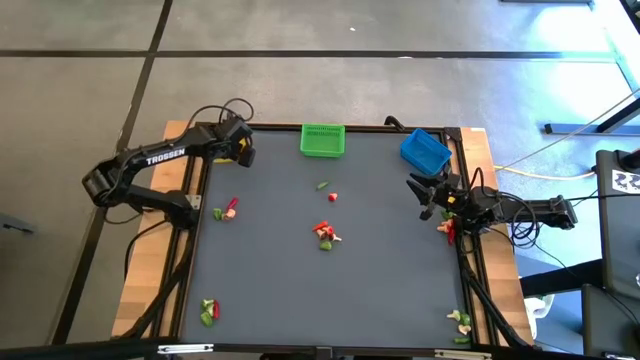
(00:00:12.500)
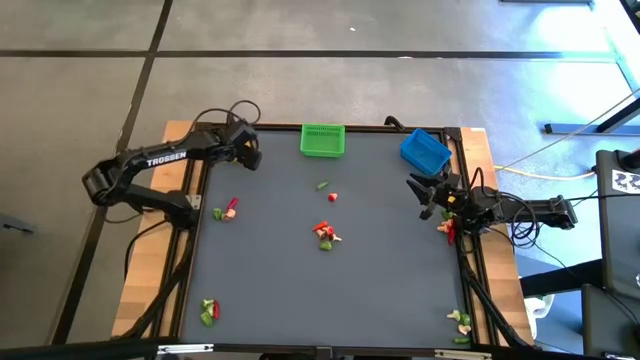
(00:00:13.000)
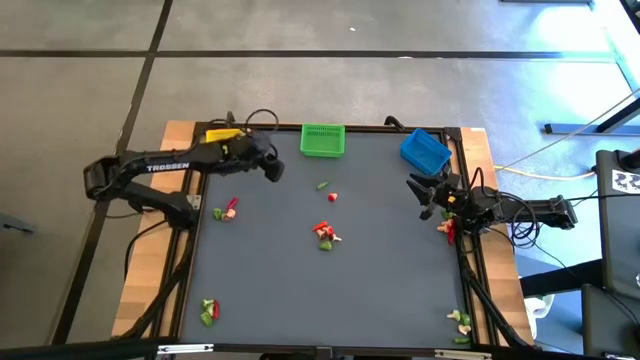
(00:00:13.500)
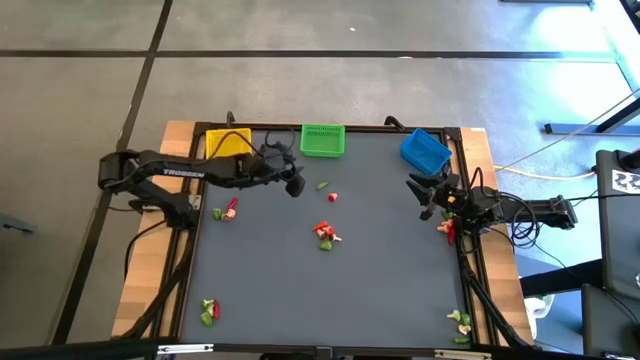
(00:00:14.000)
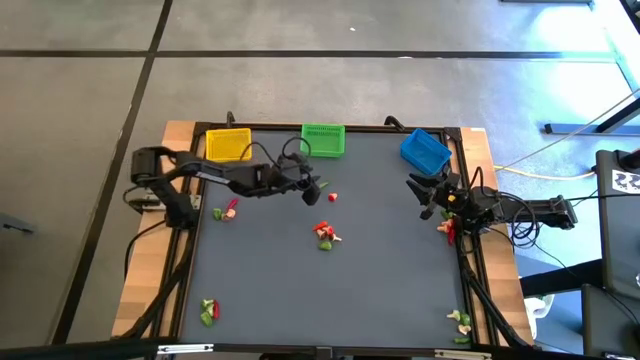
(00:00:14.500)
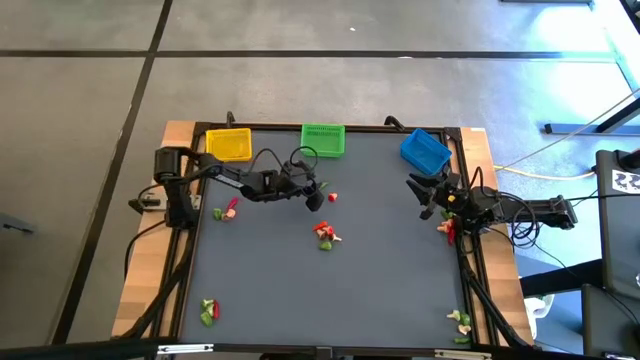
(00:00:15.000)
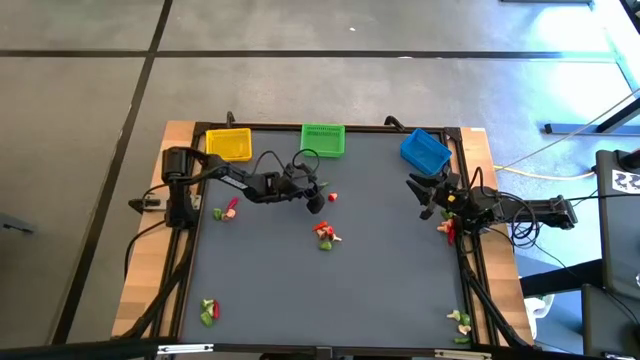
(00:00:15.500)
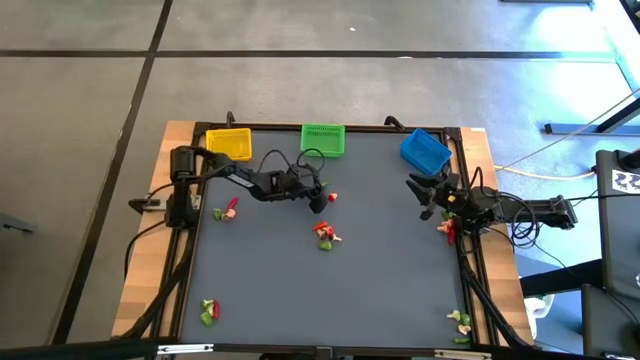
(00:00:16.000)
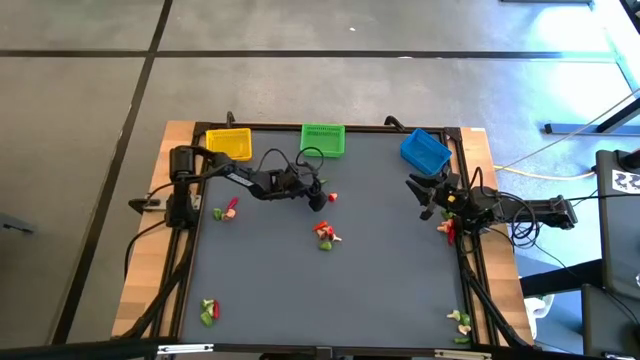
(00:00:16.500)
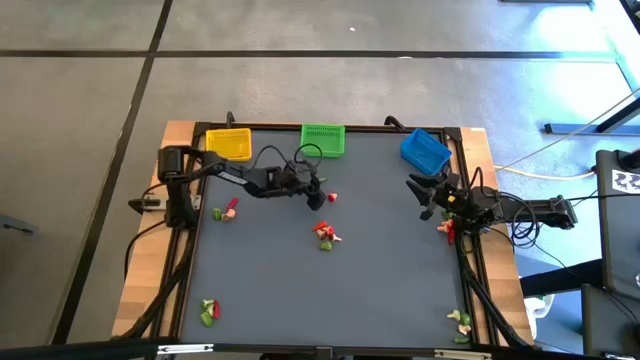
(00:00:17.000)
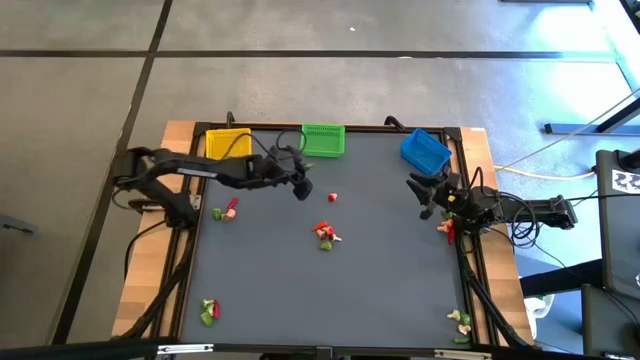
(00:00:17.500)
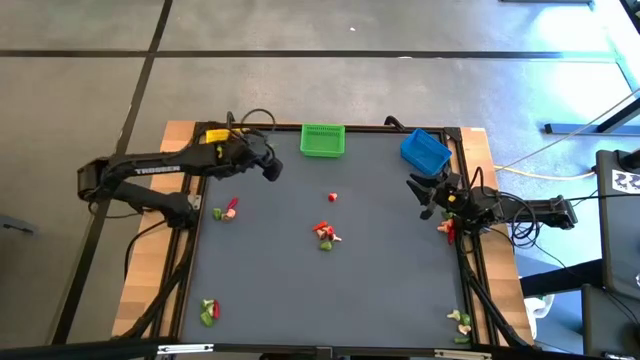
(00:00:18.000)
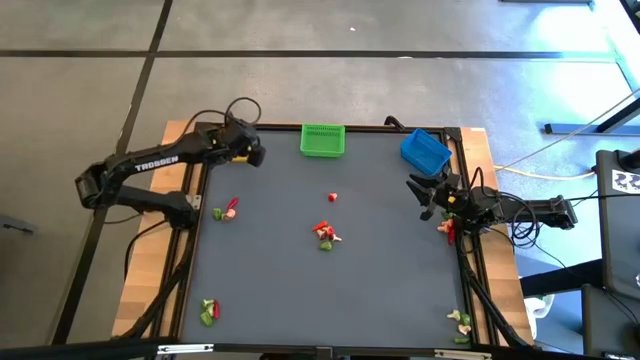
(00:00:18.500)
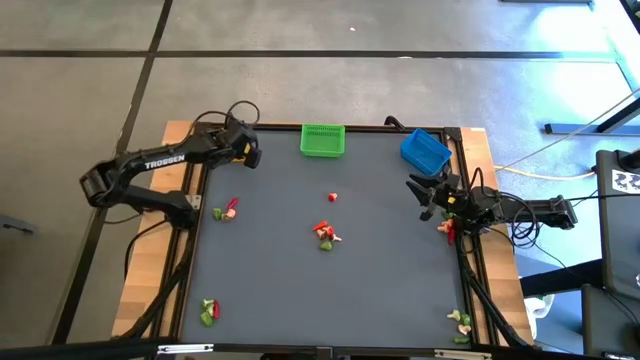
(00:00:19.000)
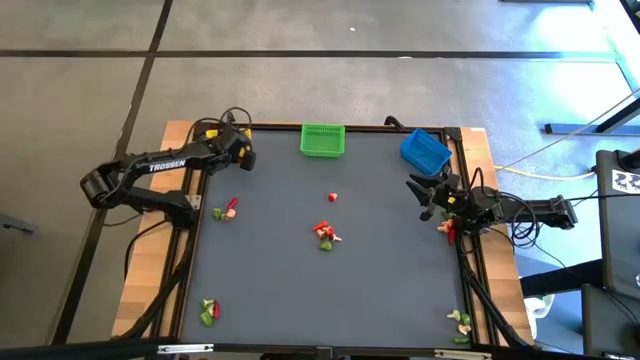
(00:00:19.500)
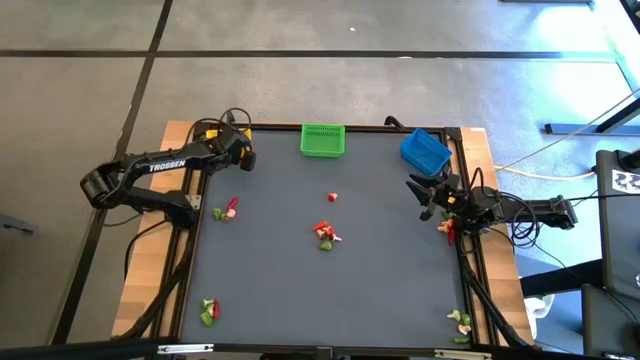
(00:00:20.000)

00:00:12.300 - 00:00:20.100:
Task: Sort produce into baskets
Put the green chili pepper into the yellow basket

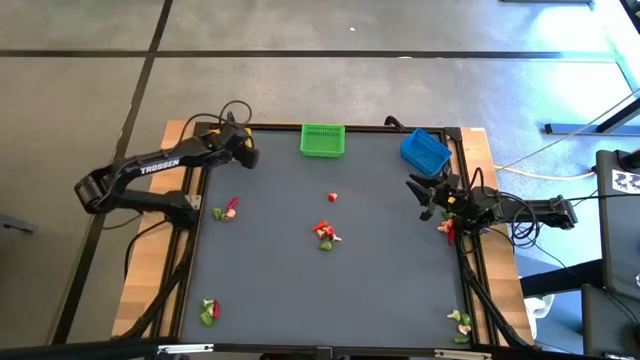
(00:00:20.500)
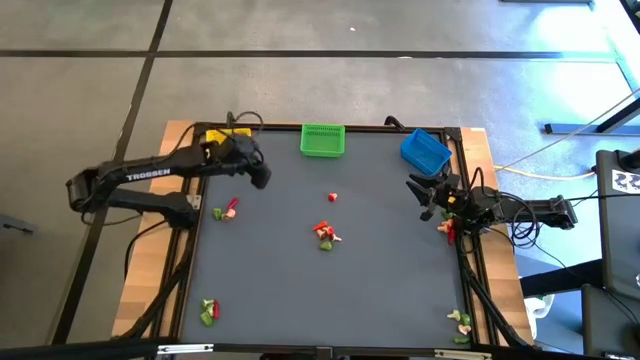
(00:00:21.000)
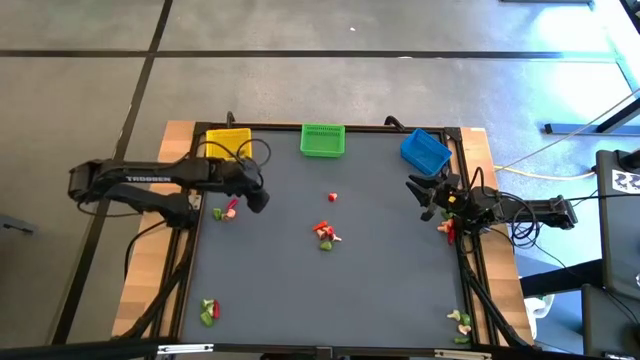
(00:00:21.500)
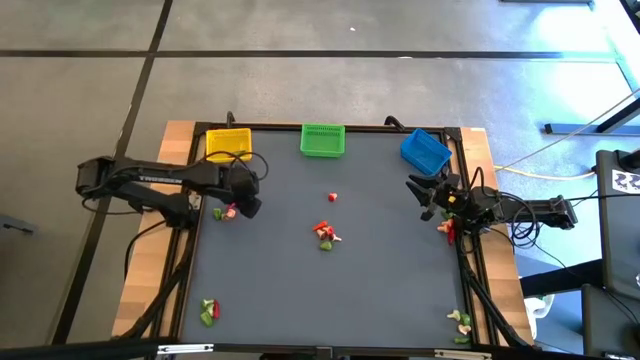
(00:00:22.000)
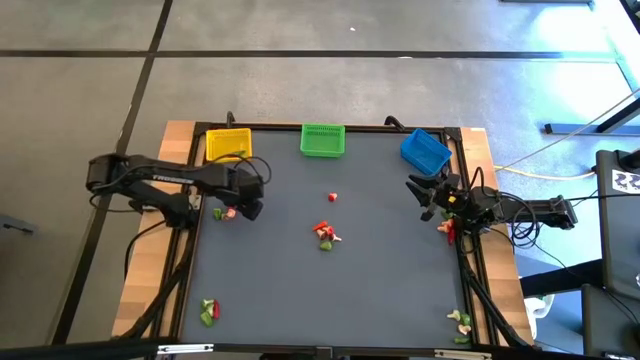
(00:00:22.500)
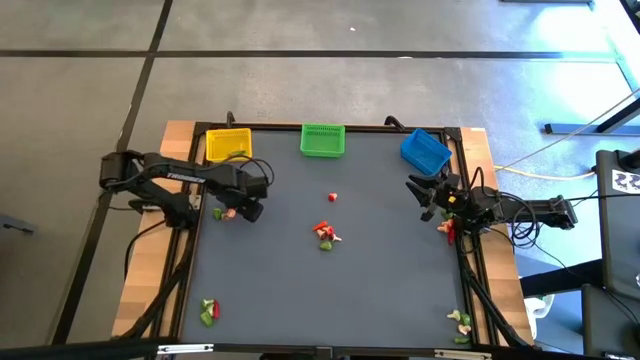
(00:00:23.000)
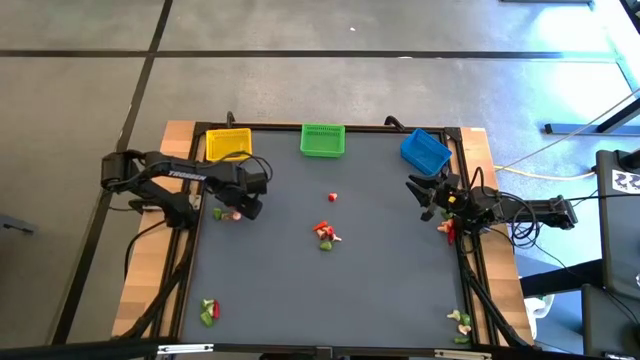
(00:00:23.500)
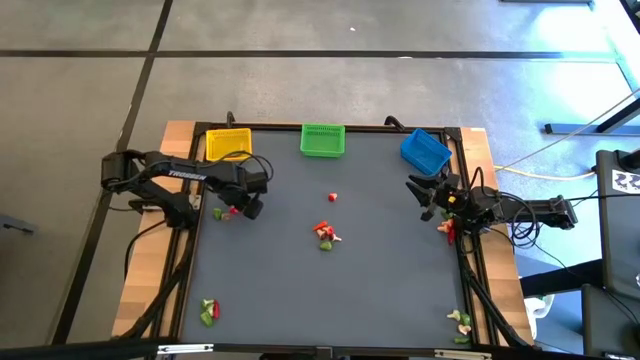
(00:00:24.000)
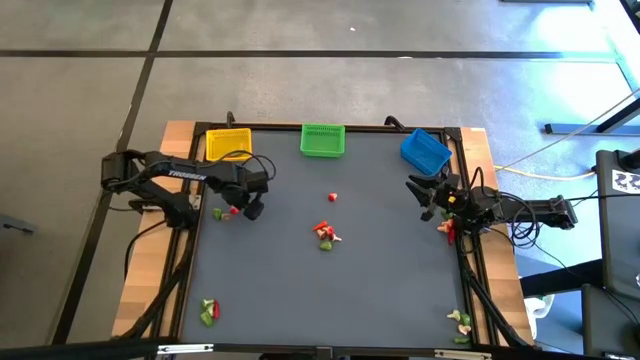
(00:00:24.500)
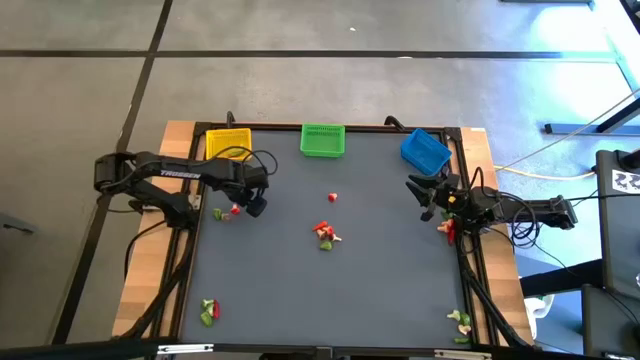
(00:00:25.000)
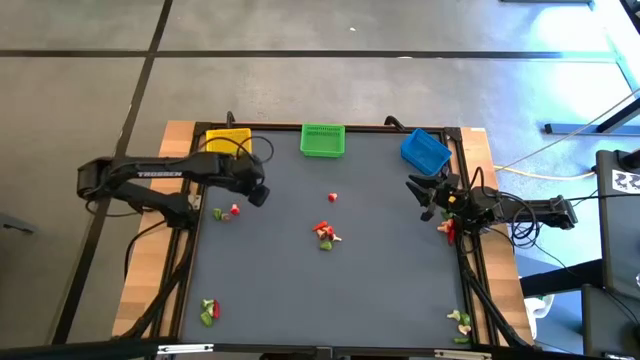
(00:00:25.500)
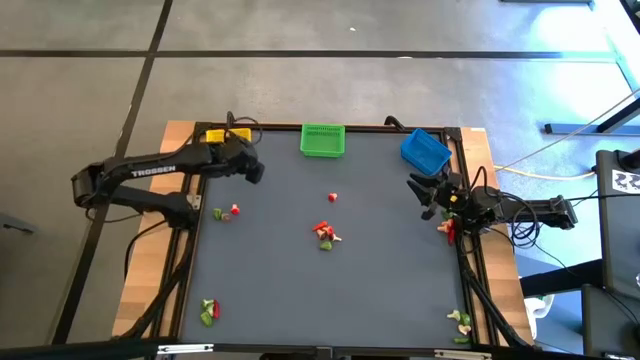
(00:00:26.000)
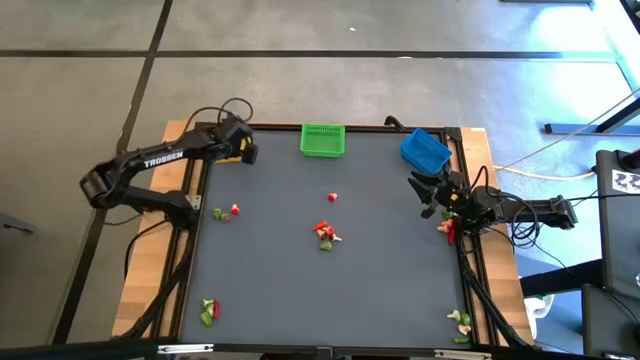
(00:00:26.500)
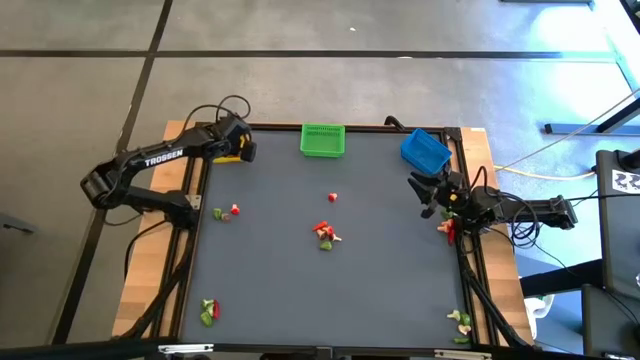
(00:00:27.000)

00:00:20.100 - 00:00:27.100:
Put the red chili pepper into the yellow basket

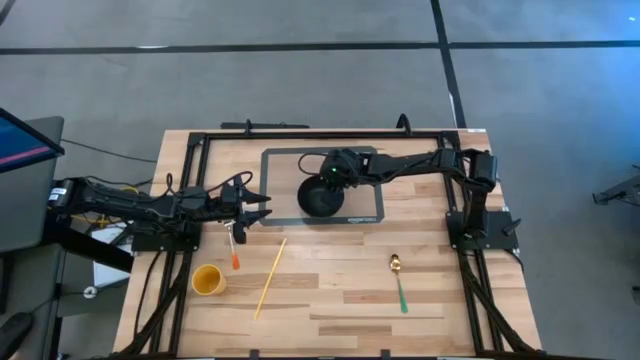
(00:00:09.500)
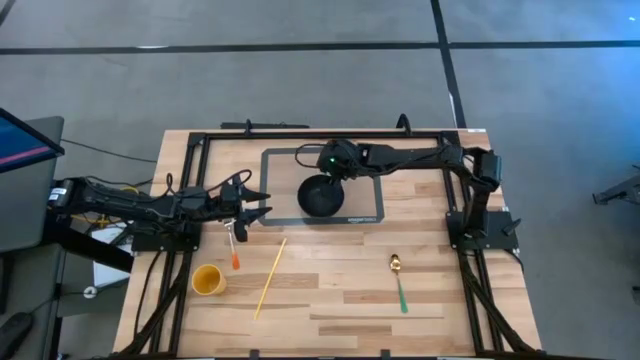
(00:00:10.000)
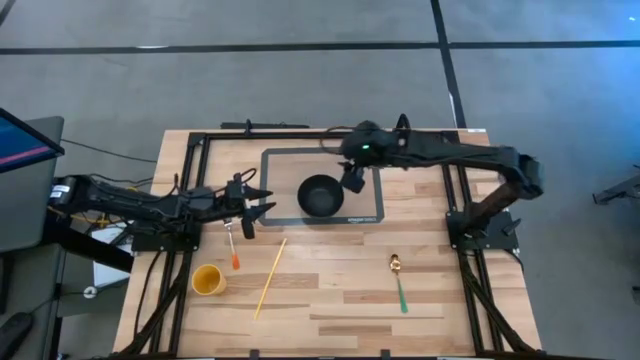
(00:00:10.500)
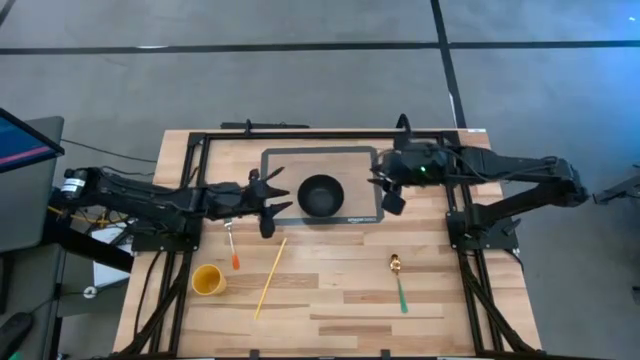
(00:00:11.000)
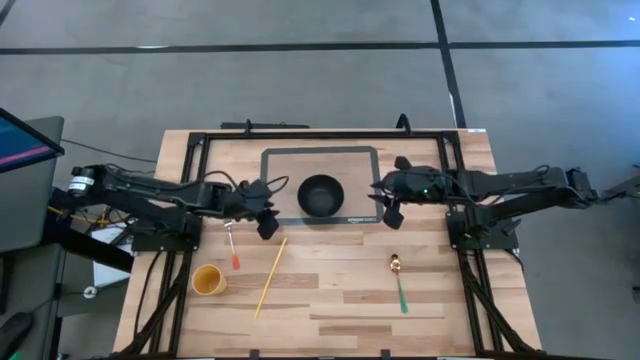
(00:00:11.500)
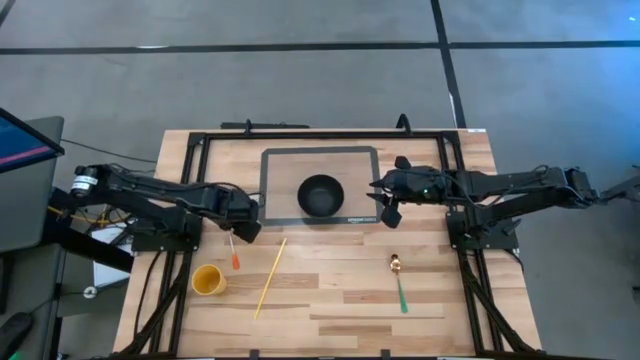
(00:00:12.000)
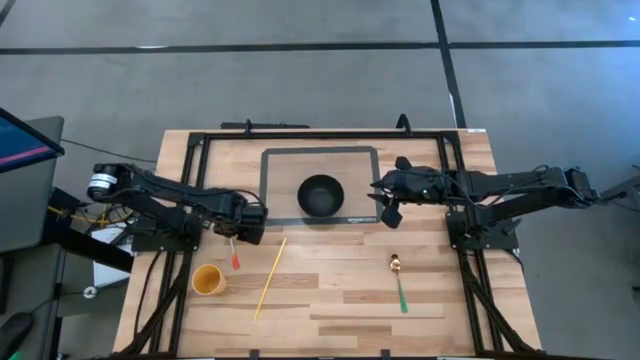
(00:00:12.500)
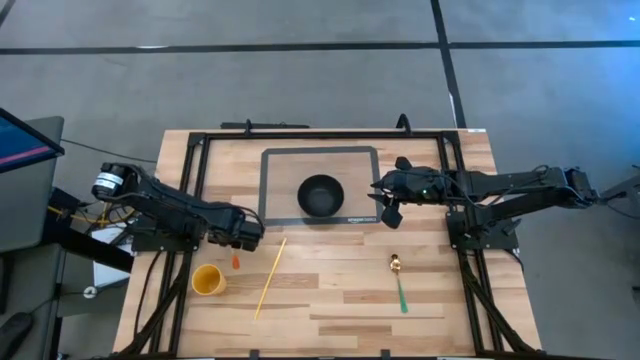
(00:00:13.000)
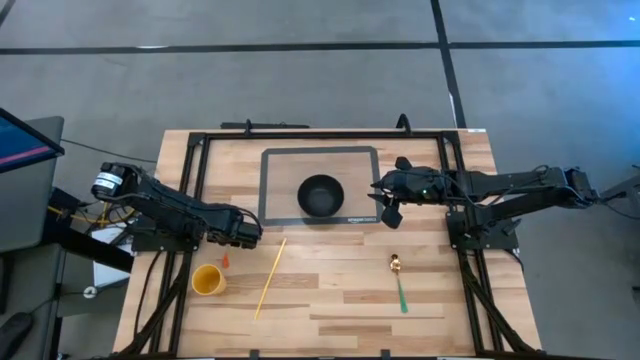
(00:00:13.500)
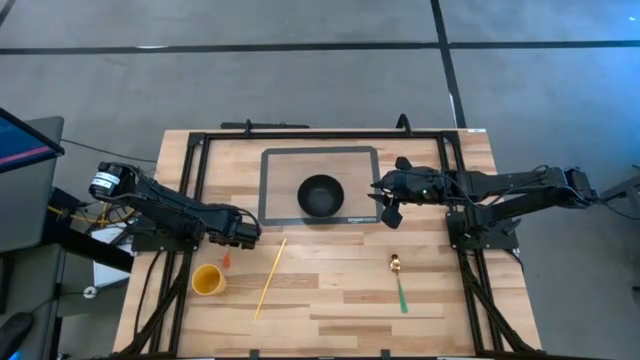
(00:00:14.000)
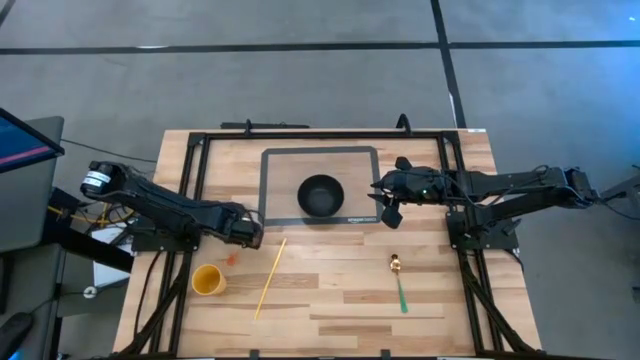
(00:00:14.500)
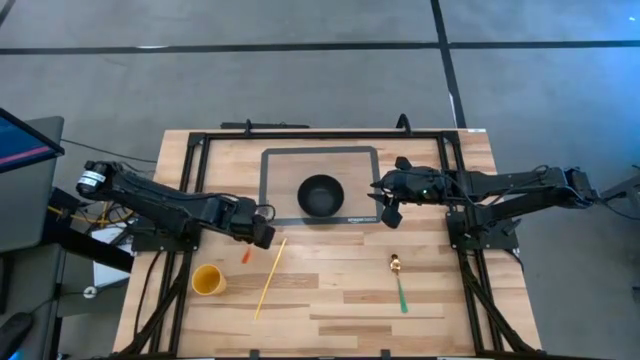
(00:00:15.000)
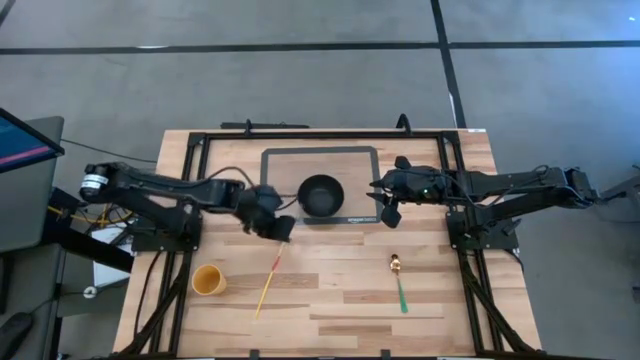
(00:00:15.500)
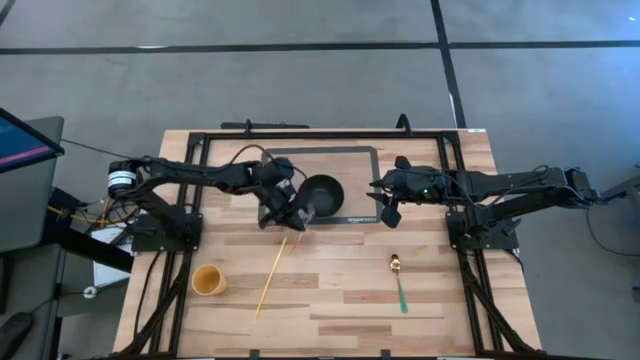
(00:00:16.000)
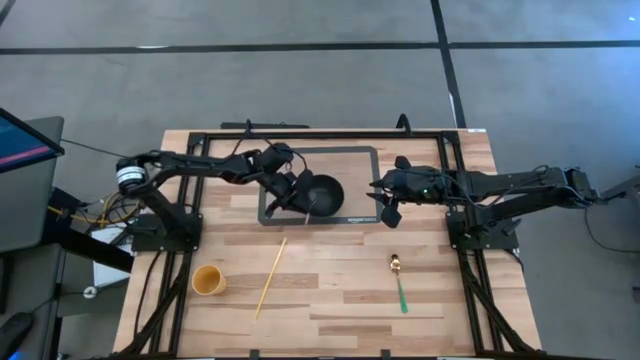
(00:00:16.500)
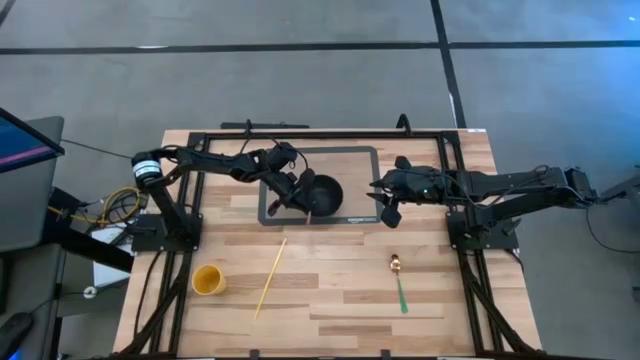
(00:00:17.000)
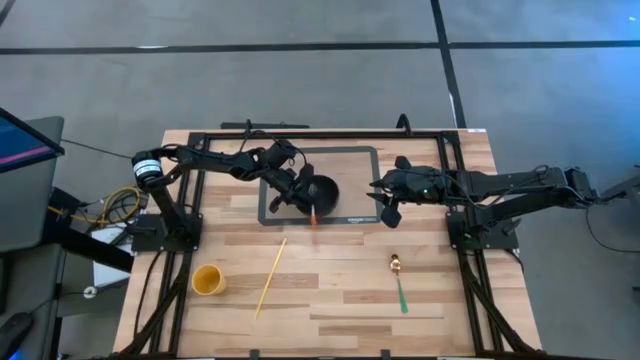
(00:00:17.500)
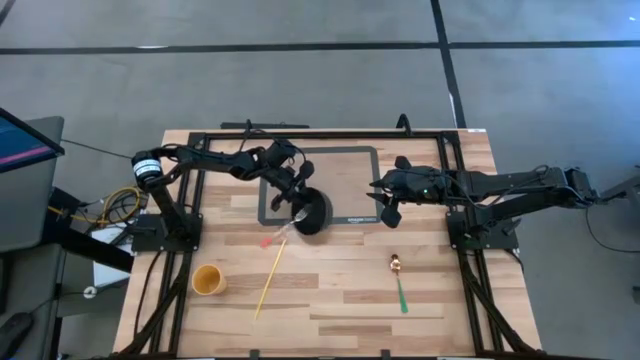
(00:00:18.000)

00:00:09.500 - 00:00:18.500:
Task: Pick & Place Utensil
Put the orange fork into the black bowl
